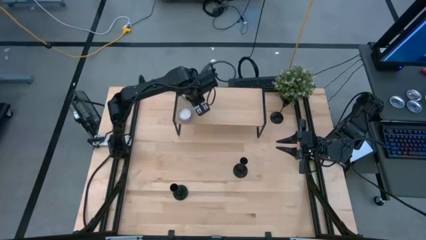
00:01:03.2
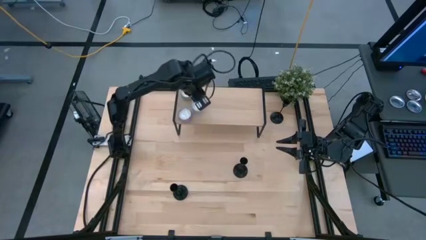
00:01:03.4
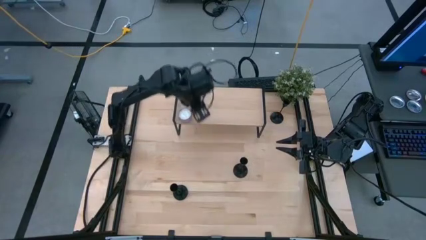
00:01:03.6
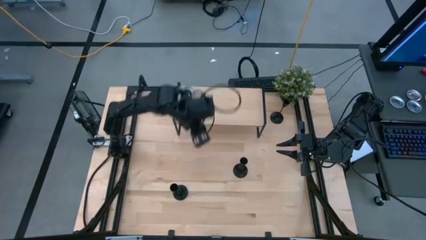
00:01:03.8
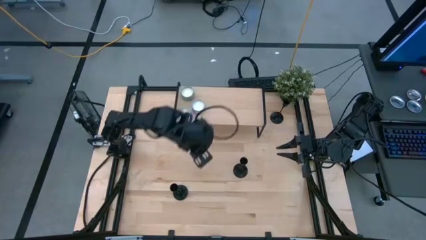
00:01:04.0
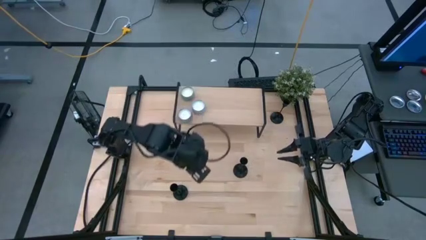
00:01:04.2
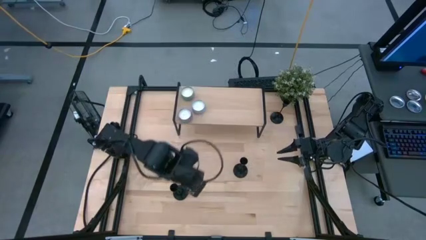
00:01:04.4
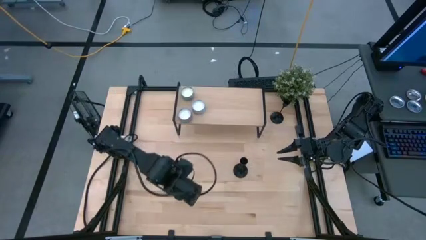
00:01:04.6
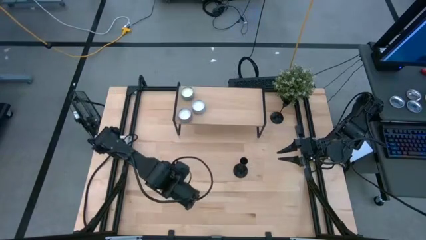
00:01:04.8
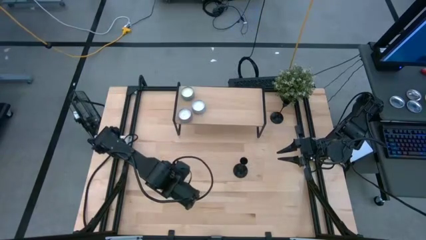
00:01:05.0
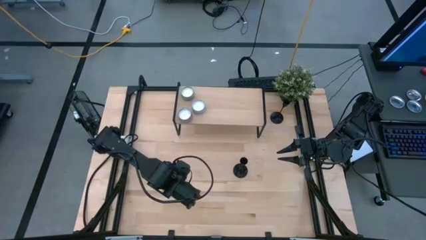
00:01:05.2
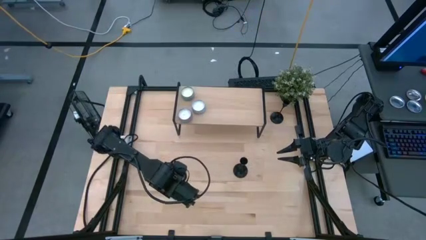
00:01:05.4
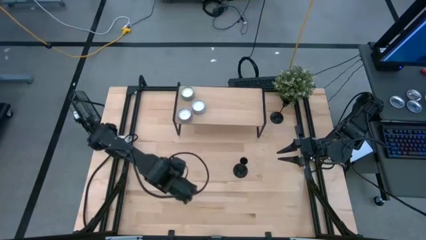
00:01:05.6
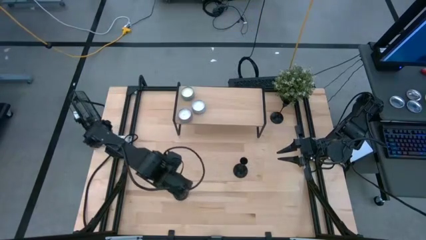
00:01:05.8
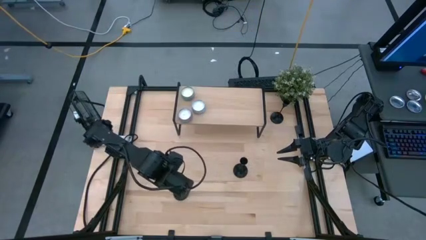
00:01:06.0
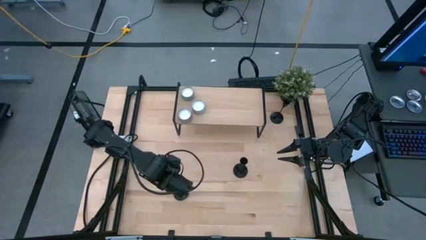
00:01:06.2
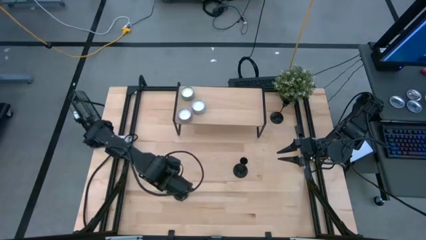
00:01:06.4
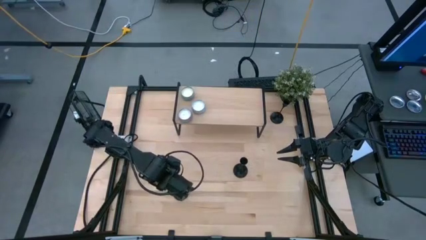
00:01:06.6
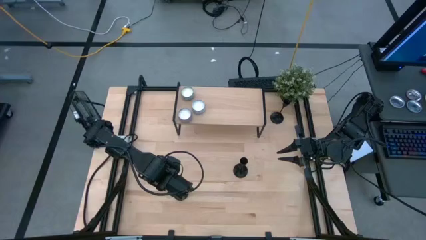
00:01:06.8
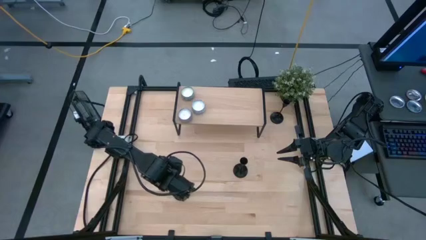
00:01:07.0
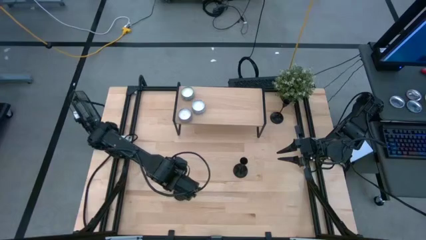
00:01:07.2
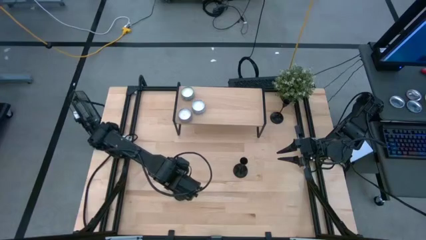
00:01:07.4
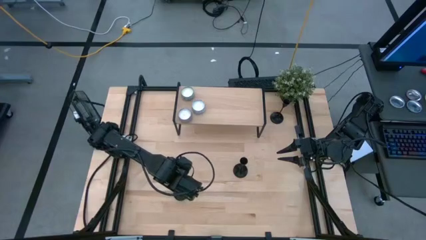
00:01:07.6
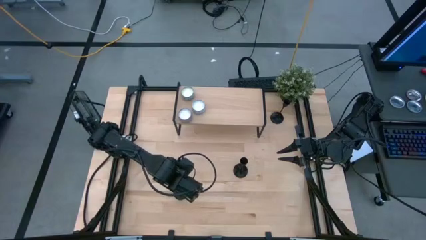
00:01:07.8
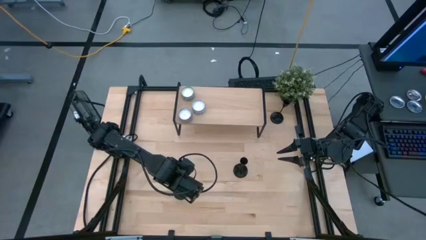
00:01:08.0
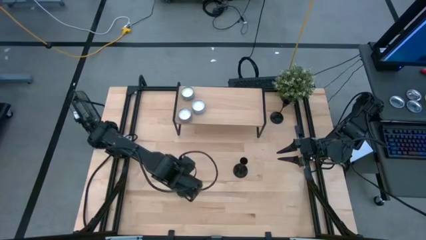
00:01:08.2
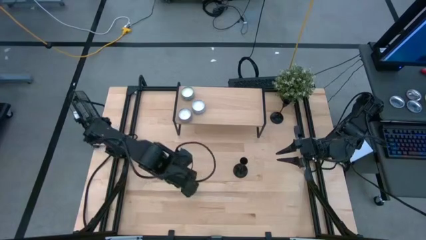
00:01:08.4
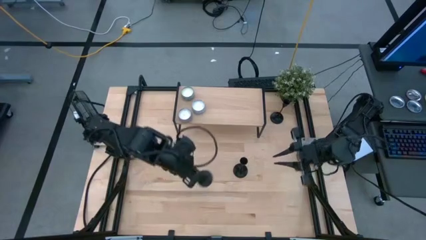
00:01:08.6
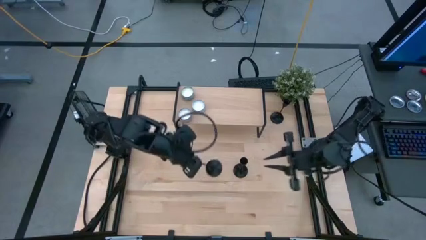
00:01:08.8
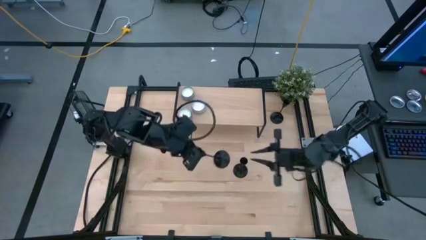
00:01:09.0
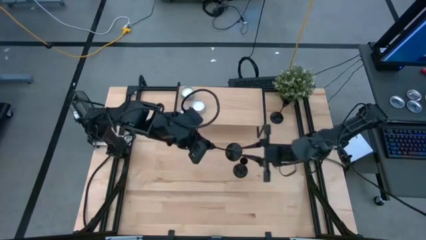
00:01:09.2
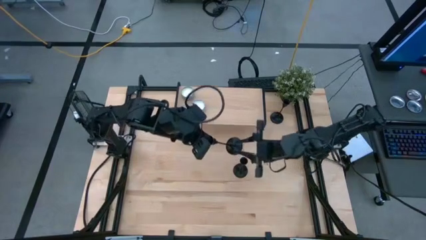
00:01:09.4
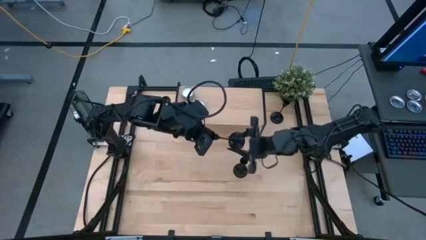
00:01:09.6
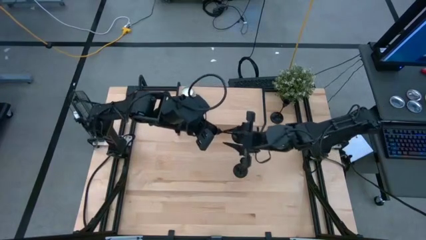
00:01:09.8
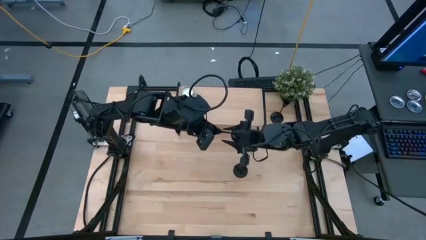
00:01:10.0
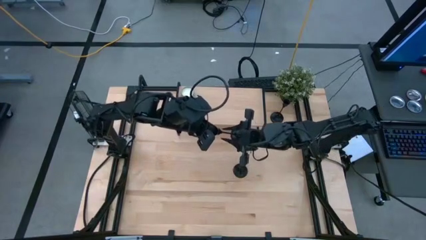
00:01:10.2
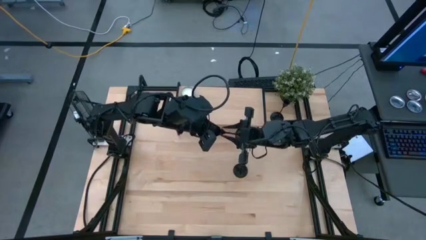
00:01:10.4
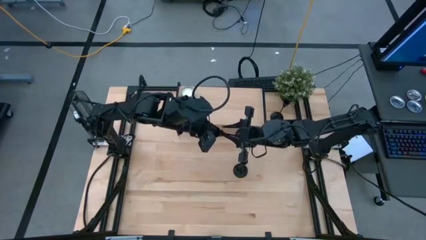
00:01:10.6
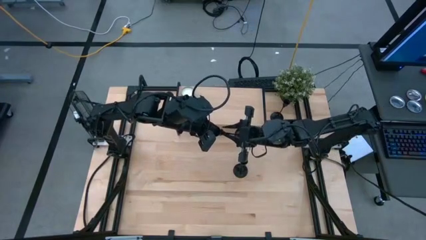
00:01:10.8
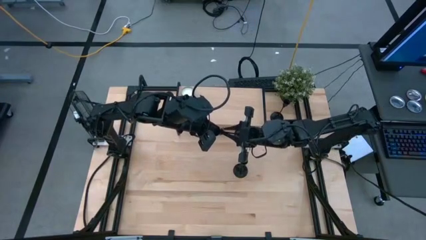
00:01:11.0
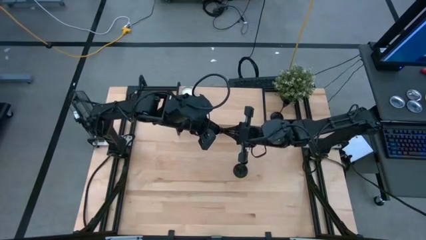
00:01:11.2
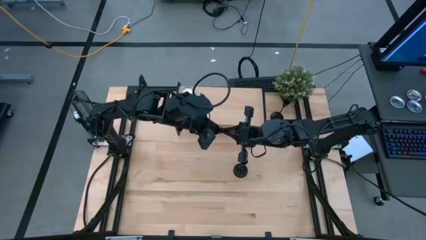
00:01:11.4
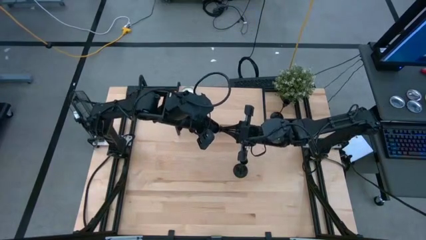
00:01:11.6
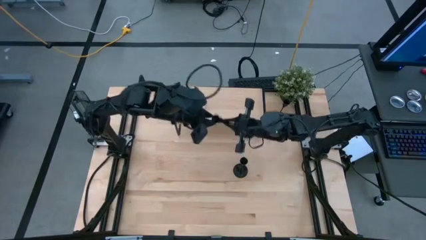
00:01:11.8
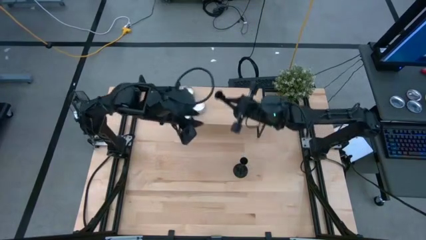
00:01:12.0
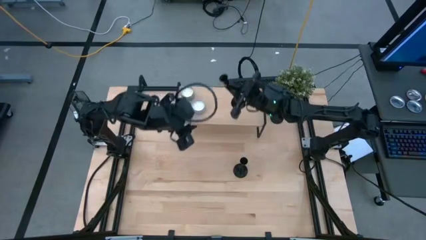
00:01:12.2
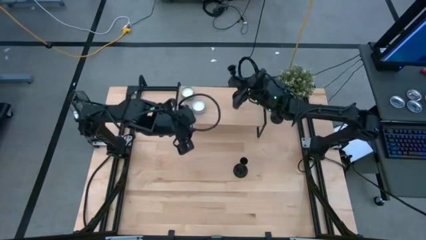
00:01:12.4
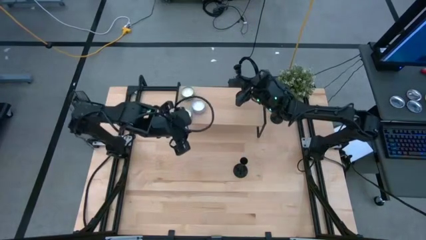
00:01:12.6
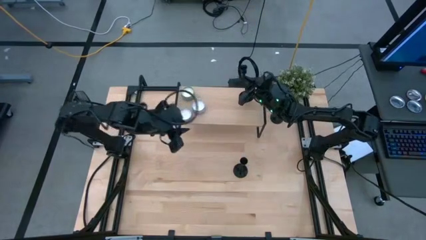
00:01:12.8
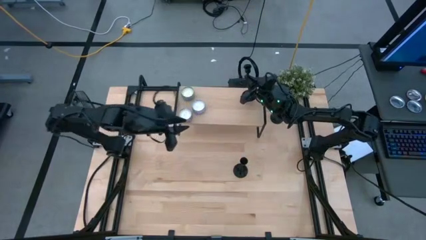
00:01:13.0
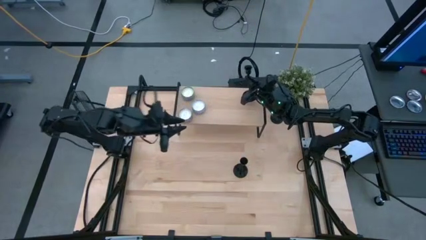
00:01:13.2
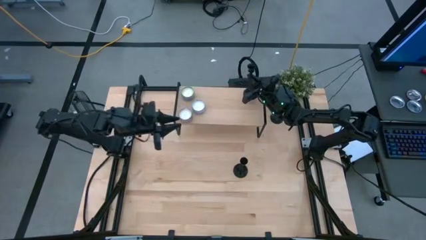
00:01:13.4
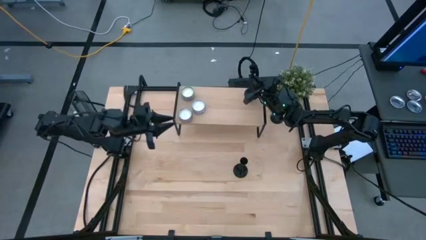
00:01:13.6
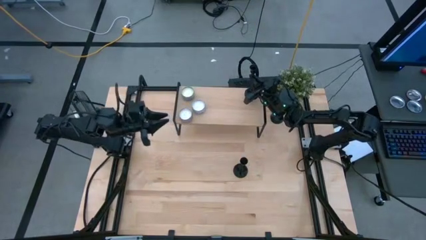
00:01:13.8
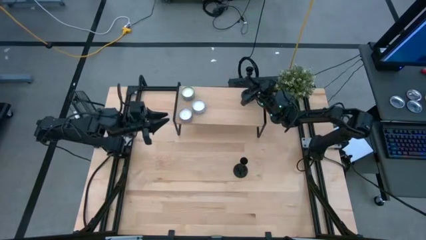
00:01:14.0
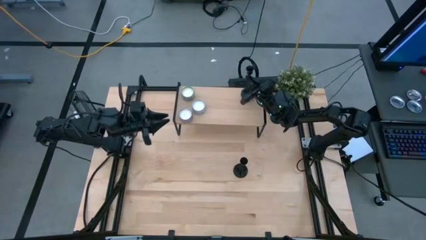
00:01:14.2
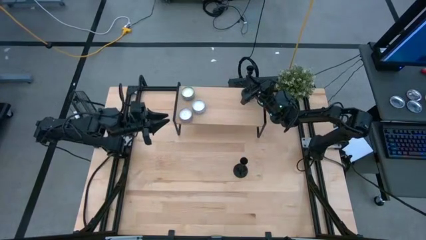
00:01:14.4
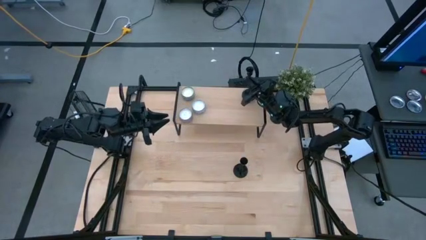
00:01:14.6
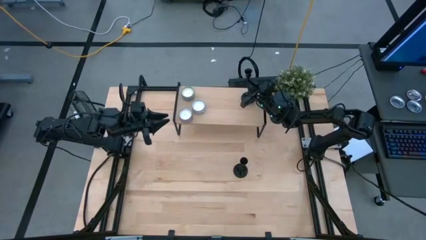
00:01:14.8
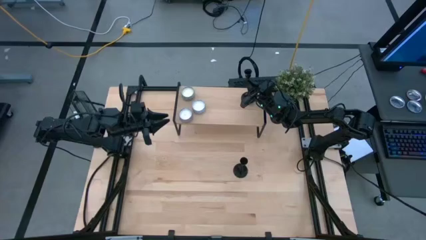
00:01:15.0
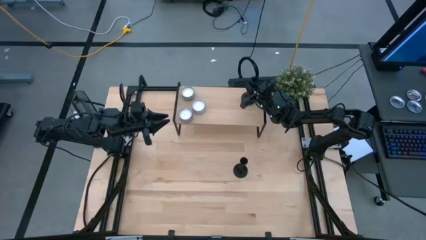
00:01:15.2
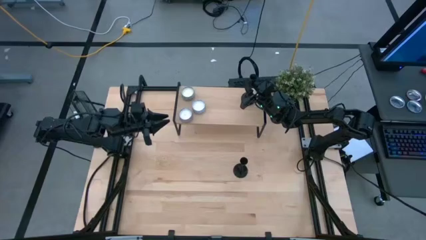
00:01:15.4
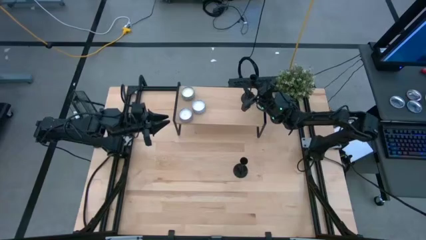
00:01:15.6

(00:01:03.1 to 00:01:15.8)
Task: Pick & Place candle stick holders
Put the bottom candle holder on the shelf

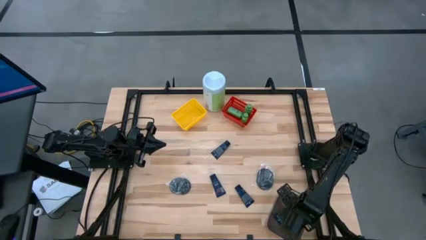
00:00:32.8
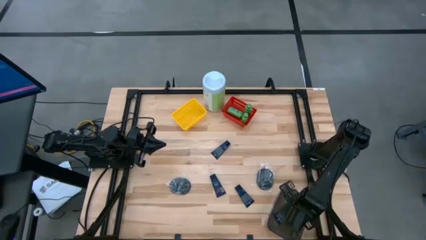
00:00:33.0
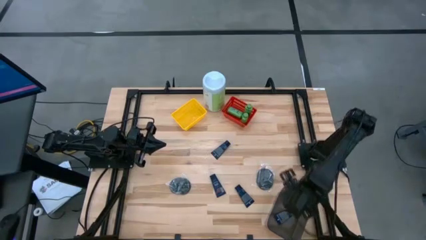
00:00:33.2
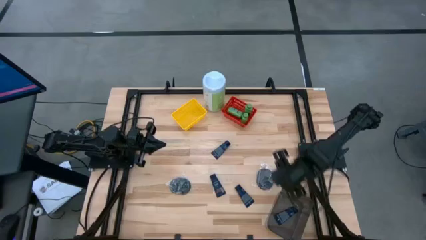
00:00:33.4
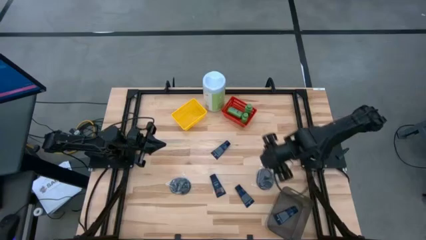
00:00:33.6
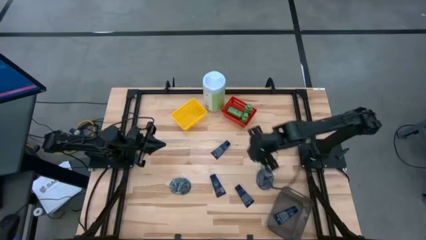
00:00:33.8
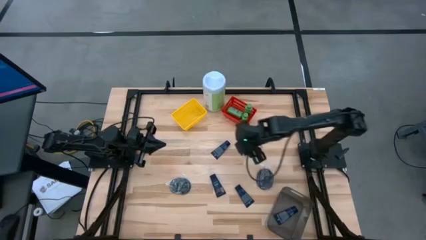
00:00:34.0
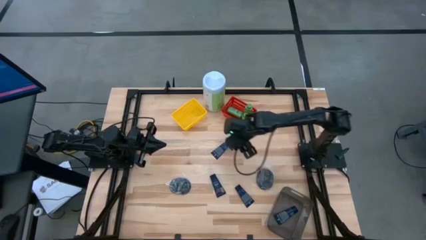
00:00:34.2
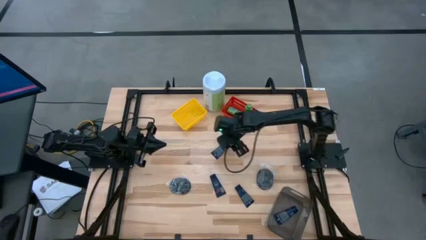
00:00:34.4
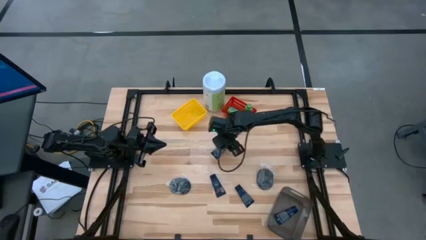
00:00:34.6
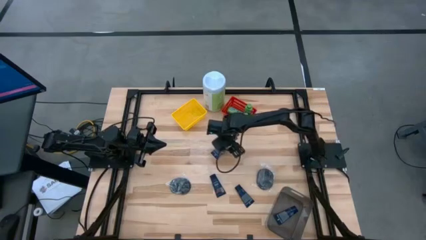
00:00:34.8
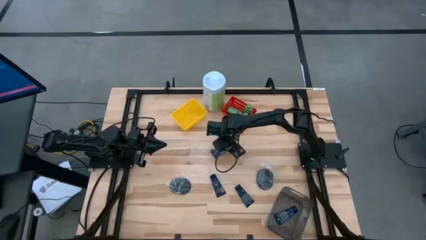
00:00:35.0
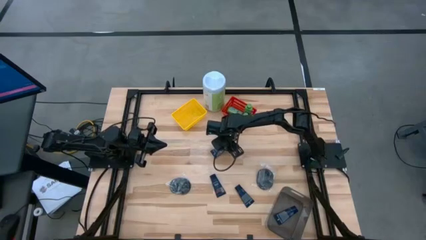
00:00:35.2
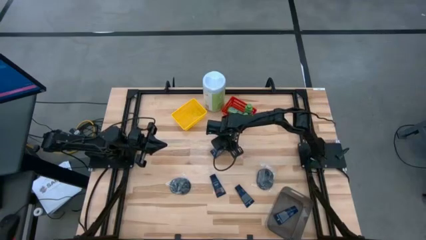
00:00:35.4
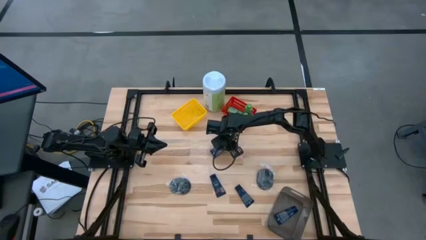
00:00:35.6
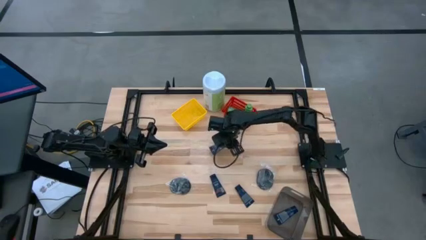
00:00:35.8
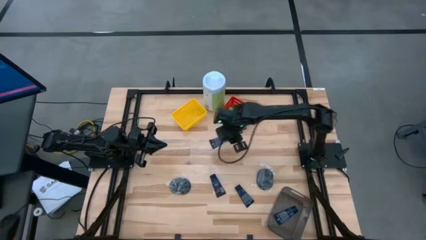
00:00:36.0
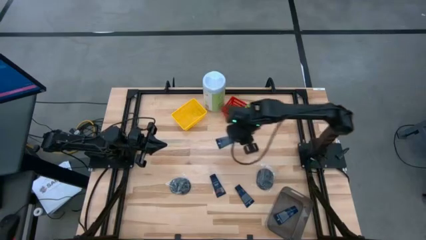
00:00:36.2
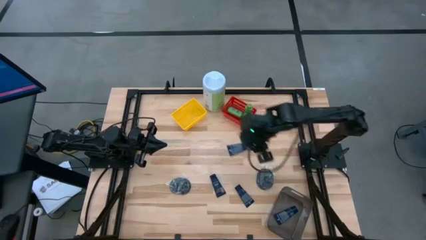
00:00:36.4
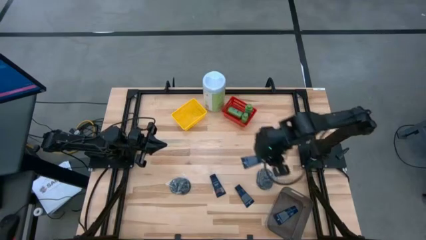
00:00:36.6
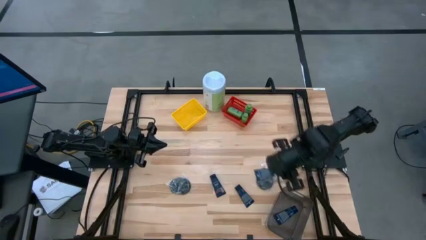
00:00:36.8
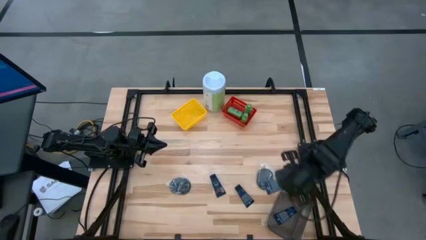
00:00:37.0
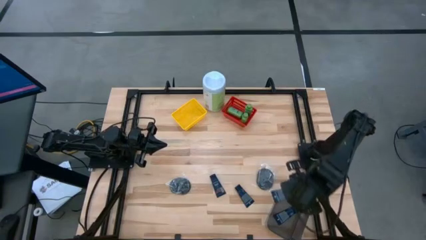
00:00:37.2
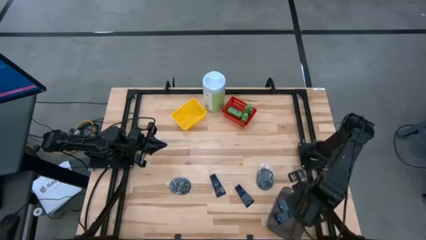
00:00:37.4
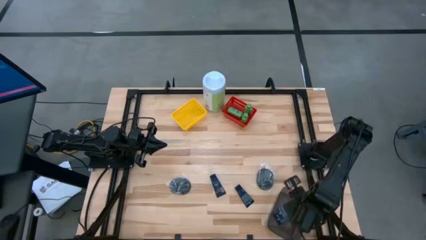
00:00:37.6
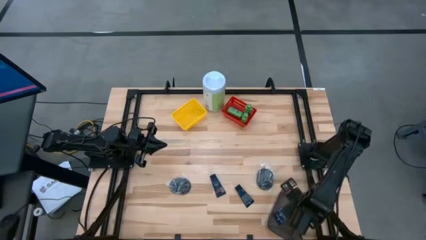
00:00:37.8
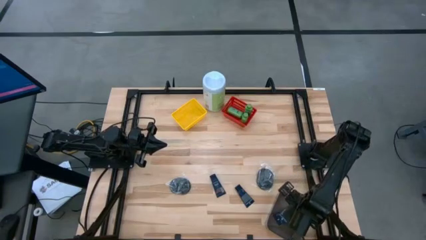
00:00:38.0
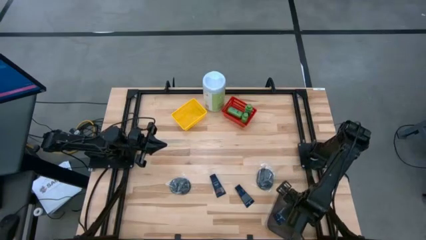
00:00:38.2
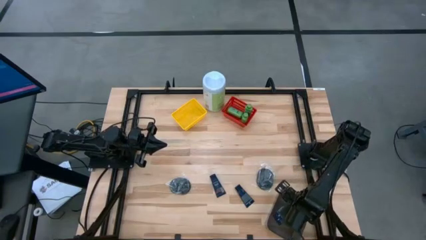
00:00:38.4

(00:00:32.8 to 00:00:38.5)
Task: Pick & Place Travel size toiletries
Put the dark blue shave cream in the black bin
